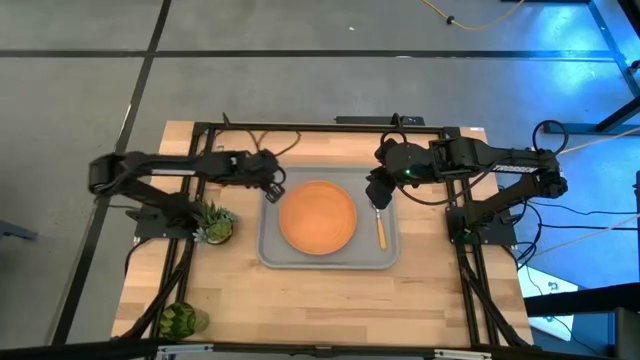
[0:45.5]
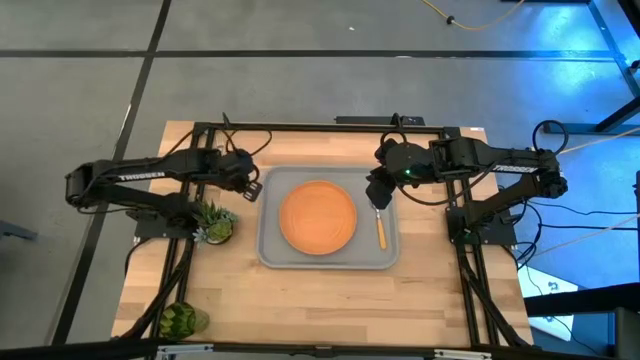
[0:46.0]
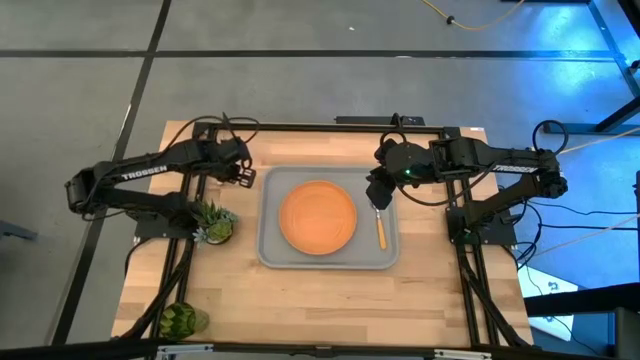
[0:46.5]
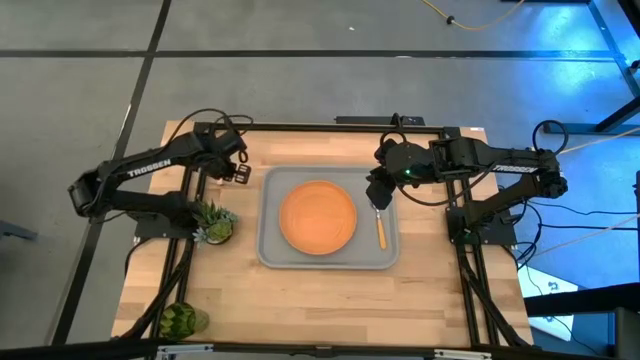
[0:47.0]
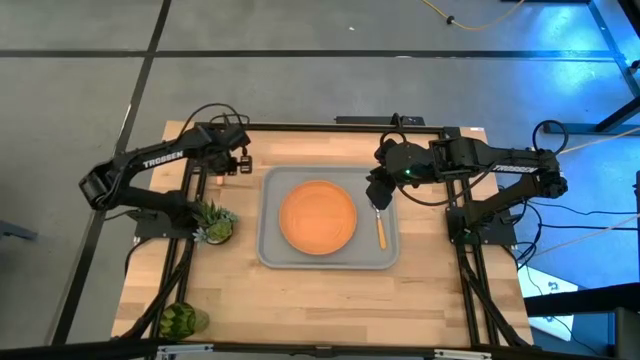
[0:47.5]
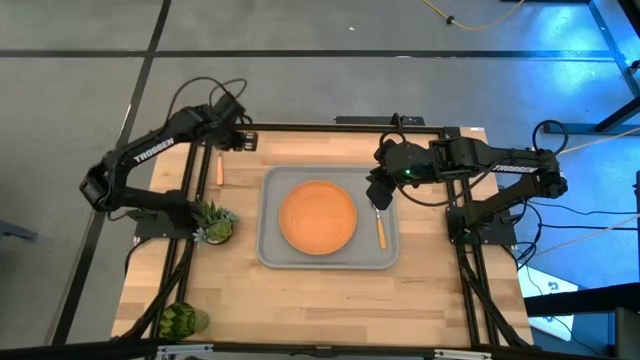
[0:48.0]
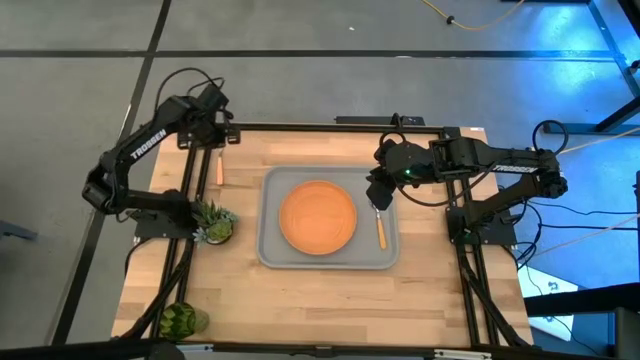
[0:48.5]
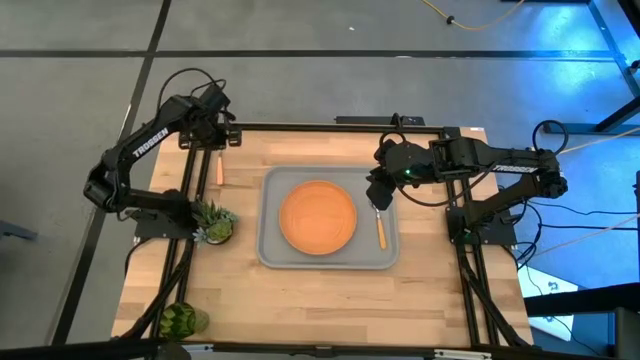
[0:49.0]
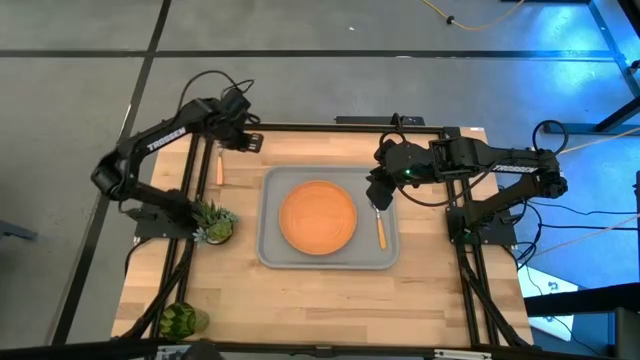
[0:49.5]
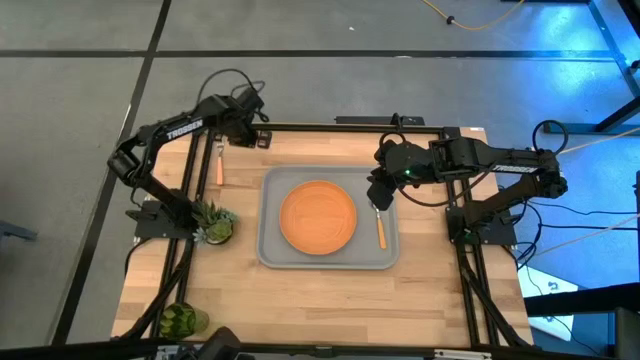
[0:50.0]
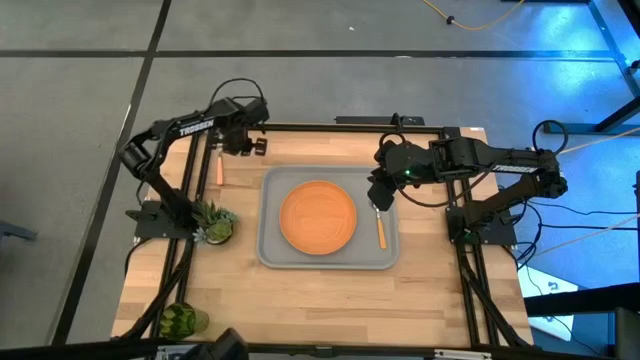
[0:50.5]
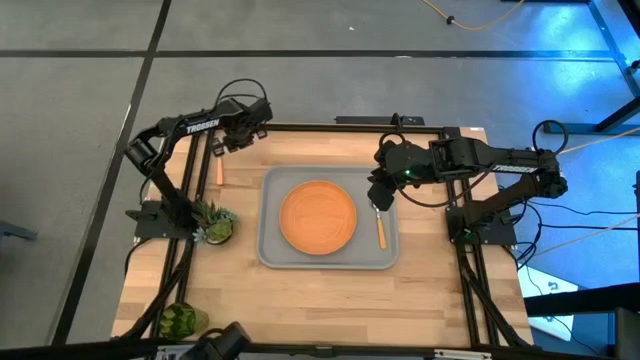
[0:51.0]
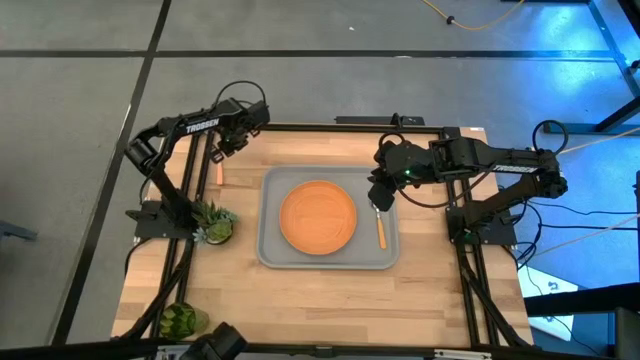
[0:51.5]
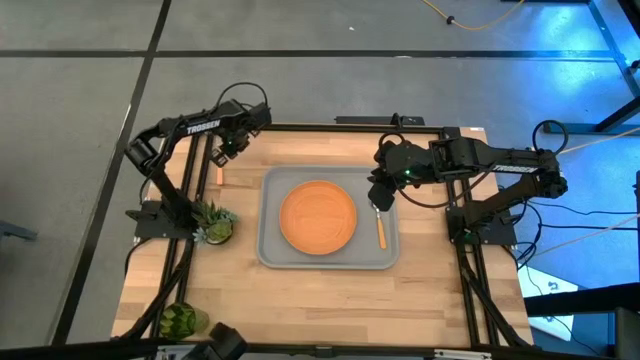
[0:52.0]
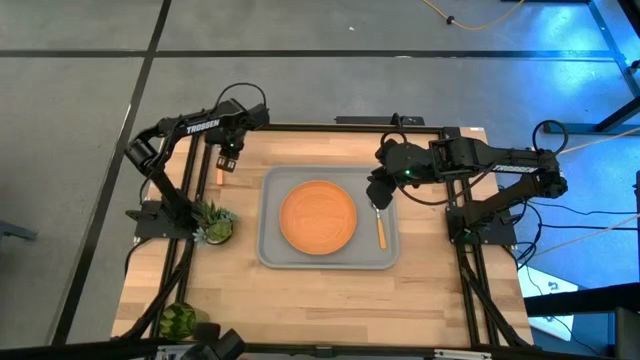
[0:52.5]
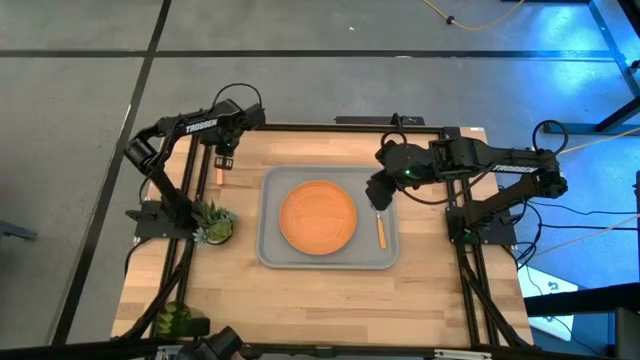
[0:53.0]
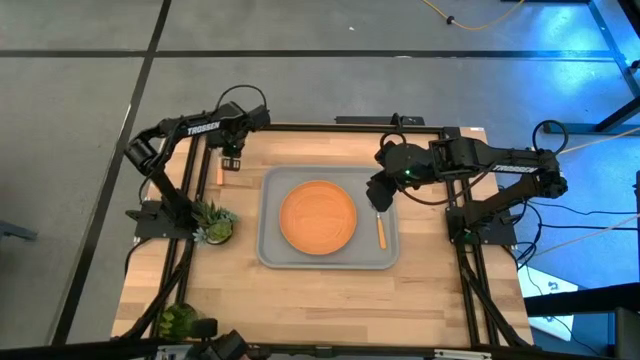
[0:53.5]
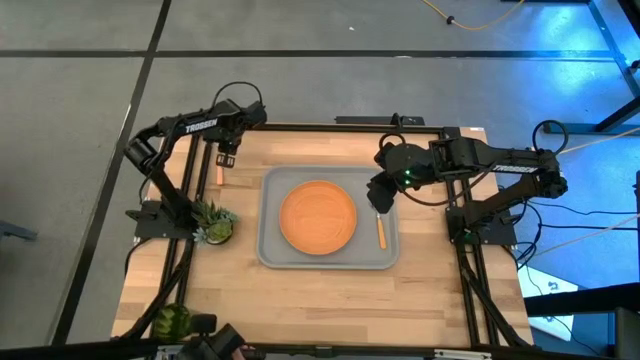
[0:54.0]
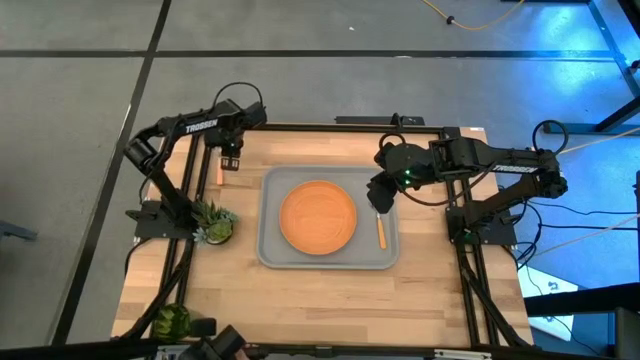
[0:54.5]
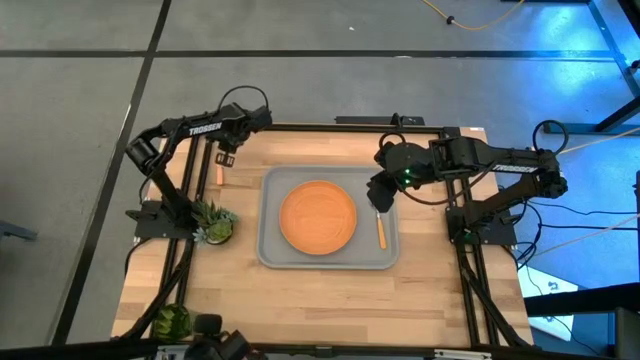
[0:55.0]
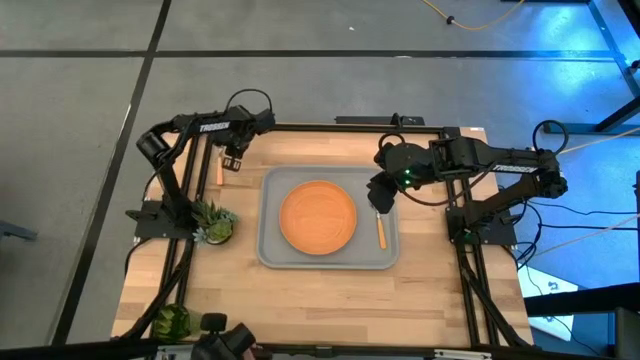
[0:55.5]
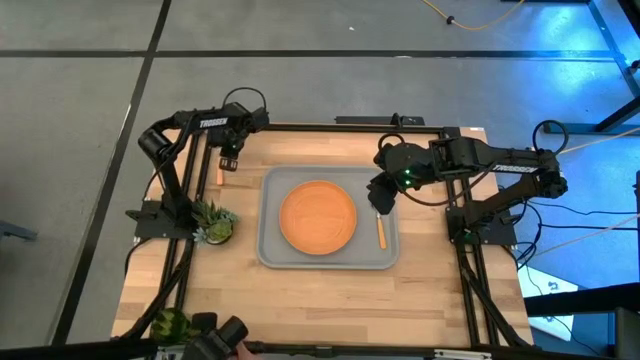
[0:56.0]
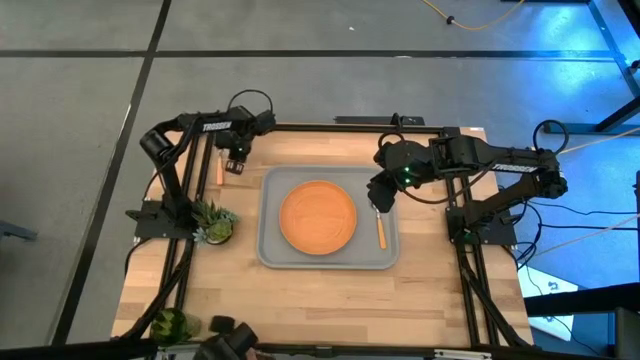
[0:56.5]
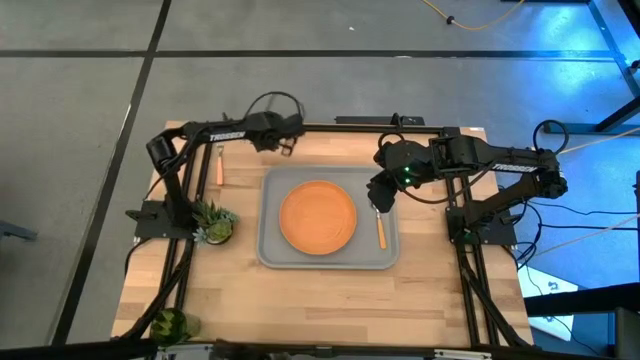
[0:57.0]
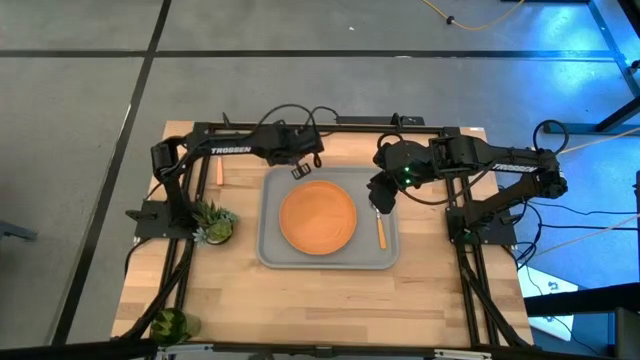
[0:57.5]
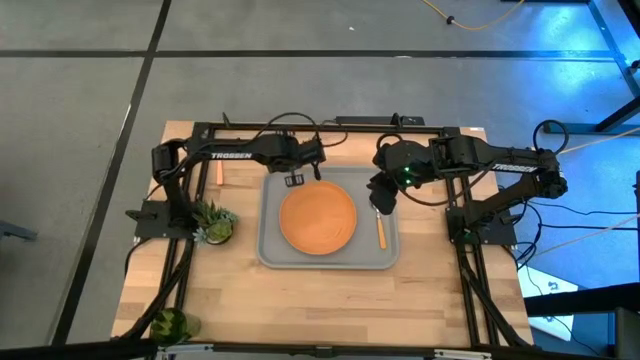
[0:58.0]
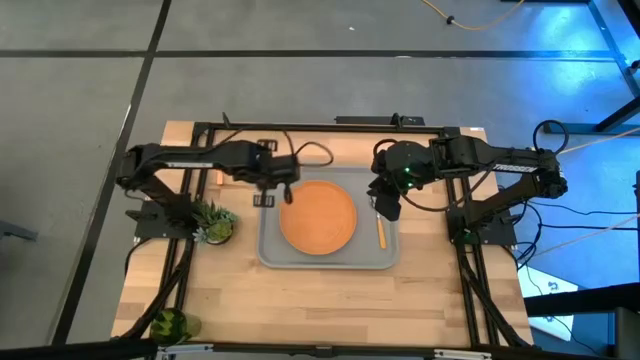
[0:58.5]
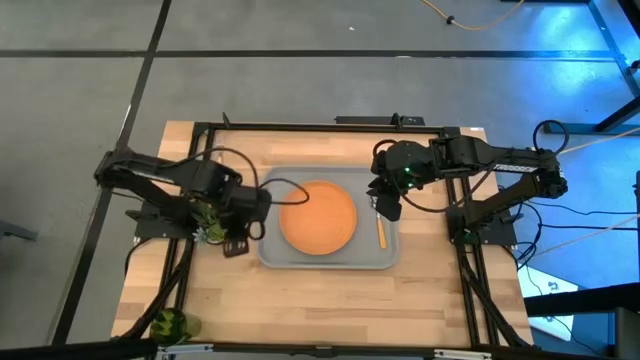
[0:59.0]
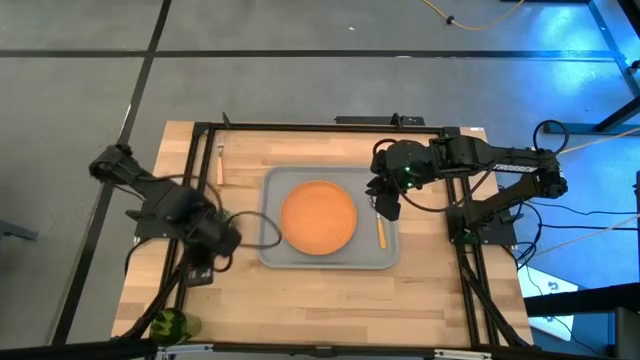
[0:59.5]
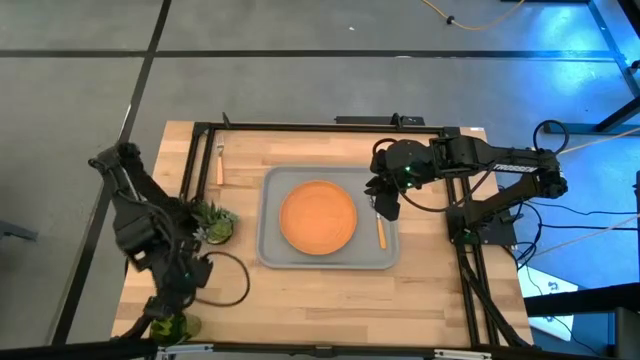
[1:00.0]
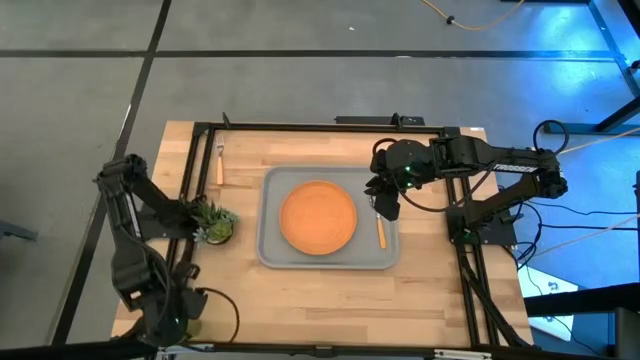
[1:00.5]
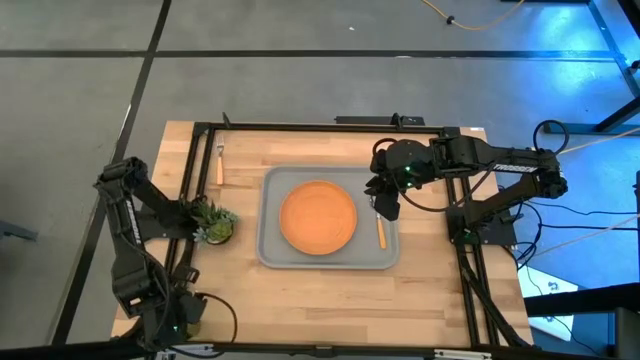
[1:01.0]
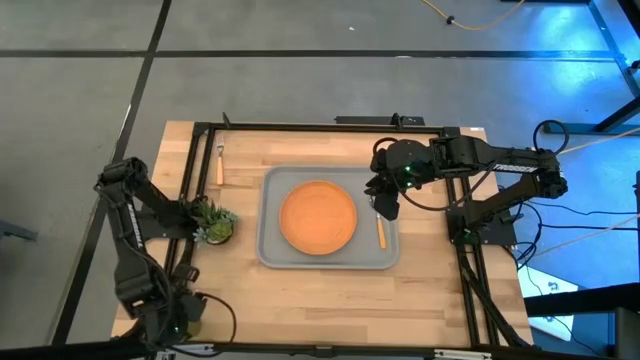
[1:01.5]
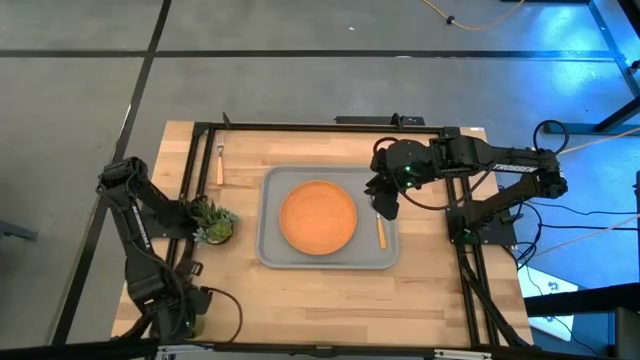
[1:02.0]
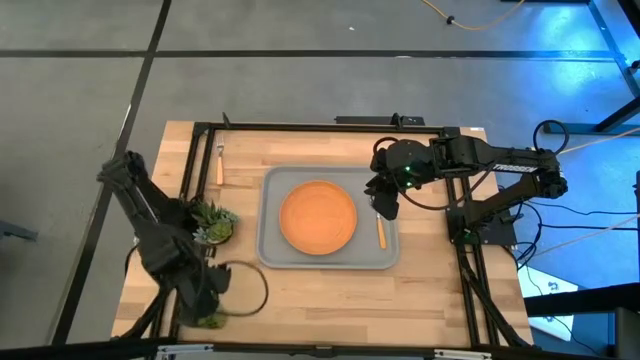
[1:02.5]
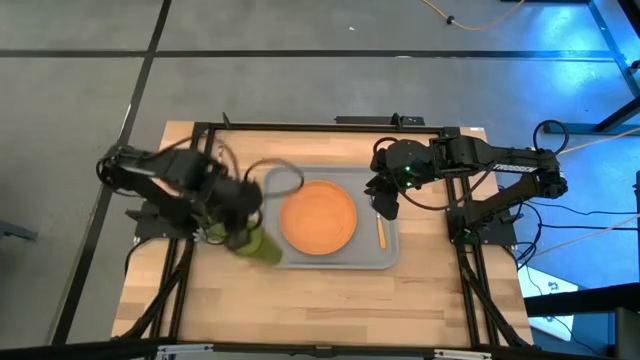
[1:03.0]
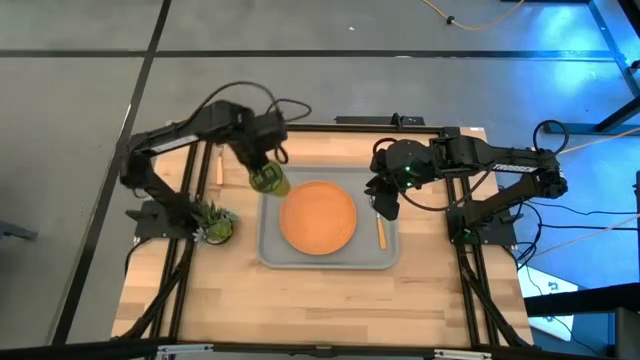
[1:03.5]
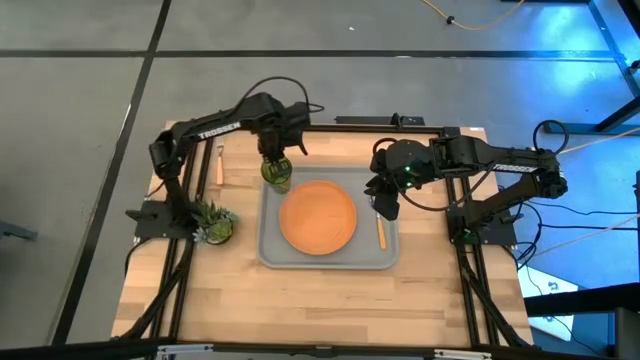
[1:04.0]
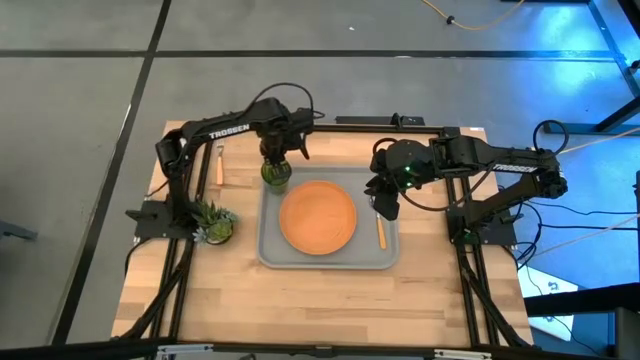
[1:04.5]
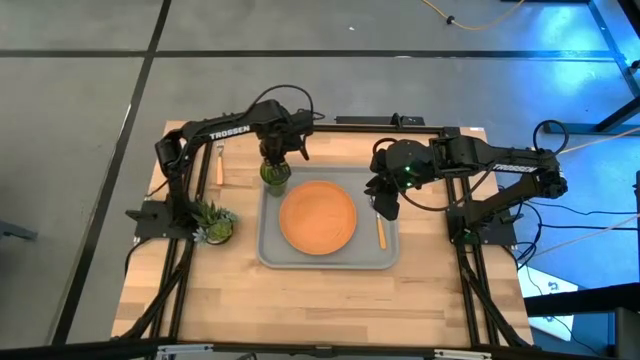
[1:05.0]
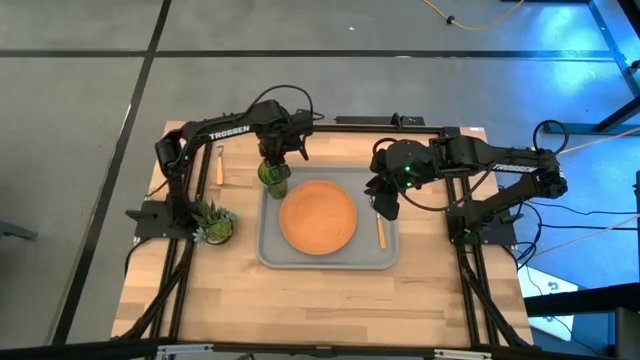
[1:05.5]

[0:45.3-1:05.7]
Task: Pick and place plate/cup/fork/spoon on tray
Put the green glass on the gray food tray to the top left of the orange plate
